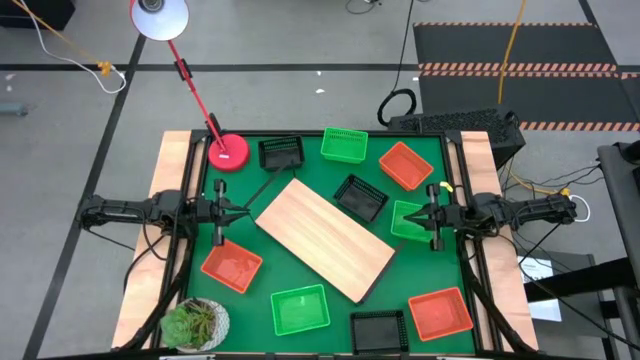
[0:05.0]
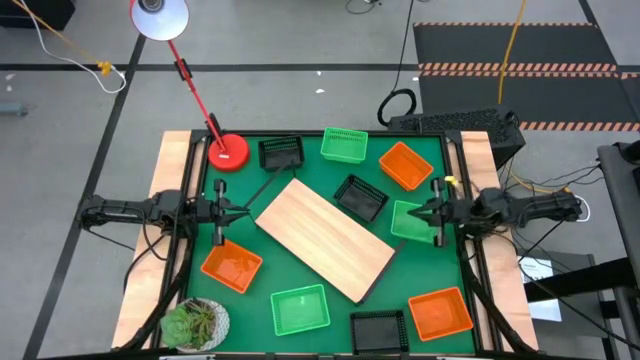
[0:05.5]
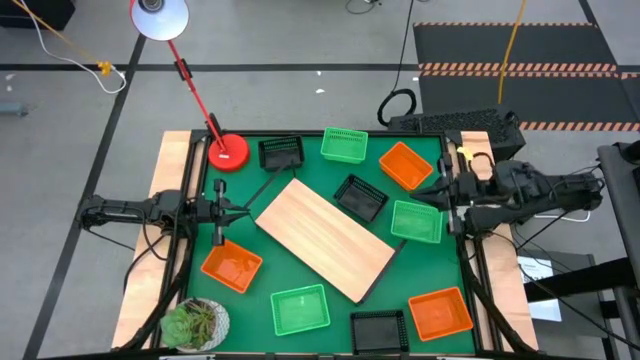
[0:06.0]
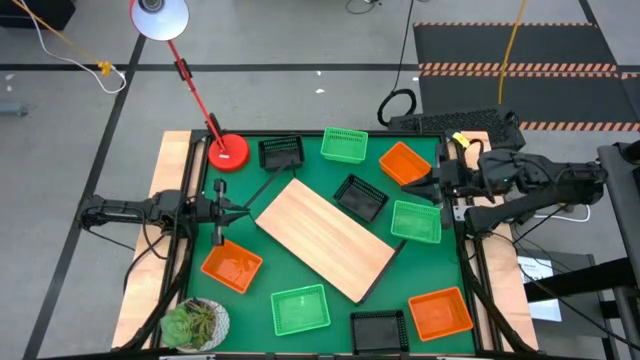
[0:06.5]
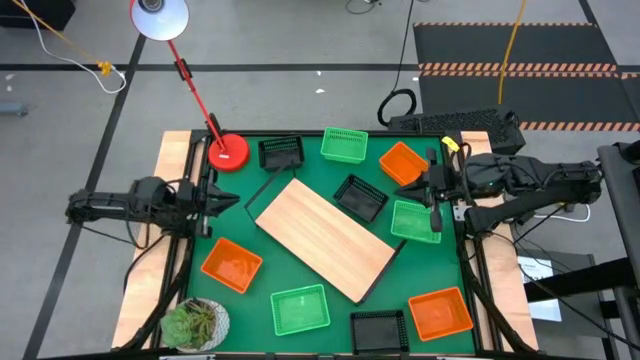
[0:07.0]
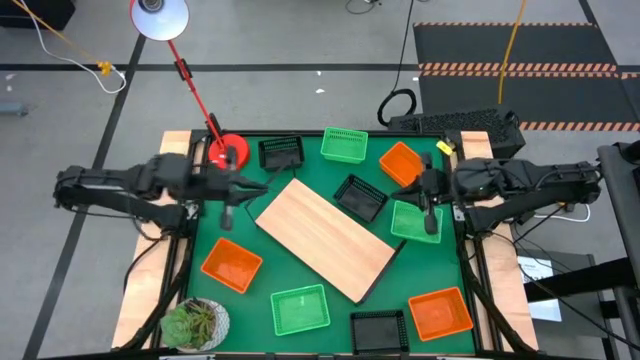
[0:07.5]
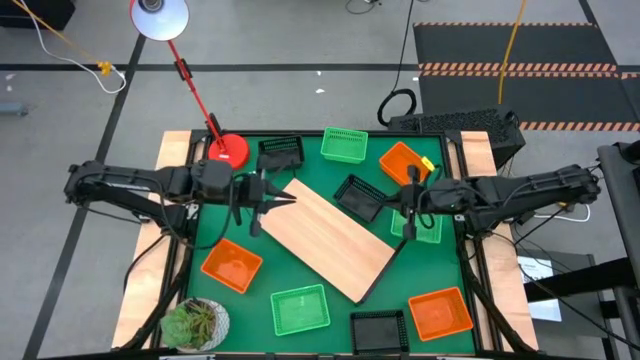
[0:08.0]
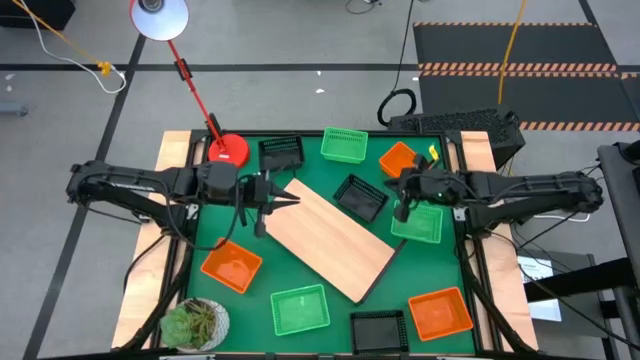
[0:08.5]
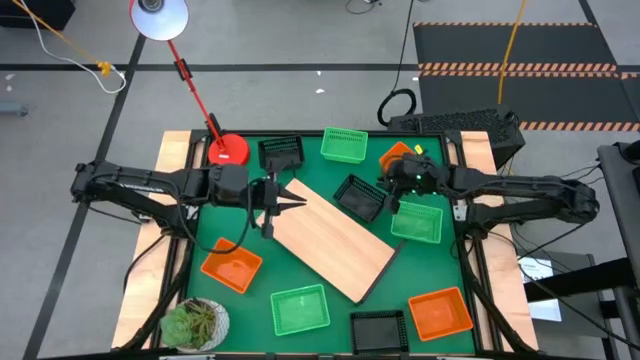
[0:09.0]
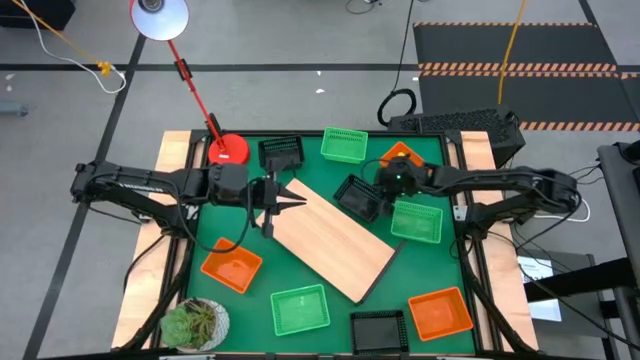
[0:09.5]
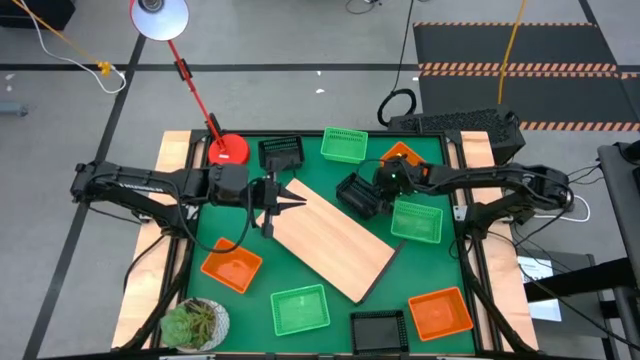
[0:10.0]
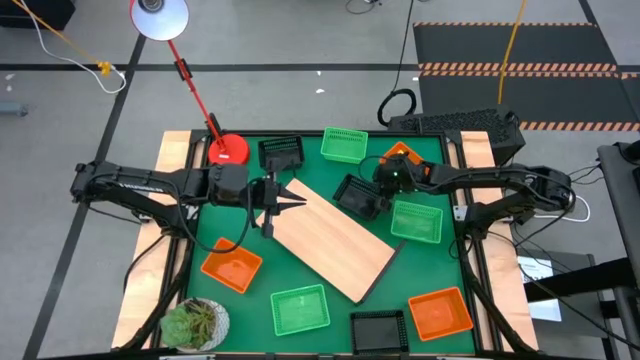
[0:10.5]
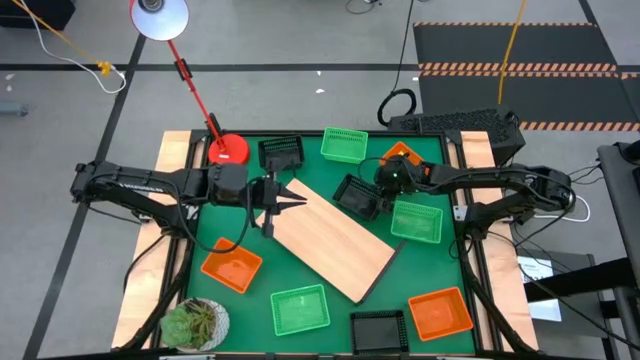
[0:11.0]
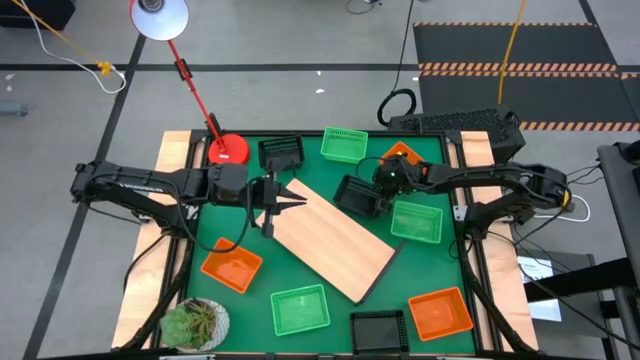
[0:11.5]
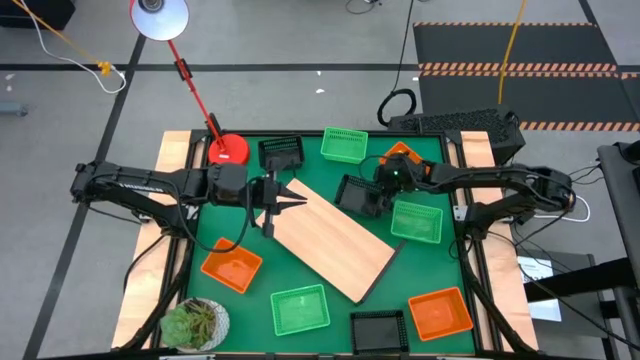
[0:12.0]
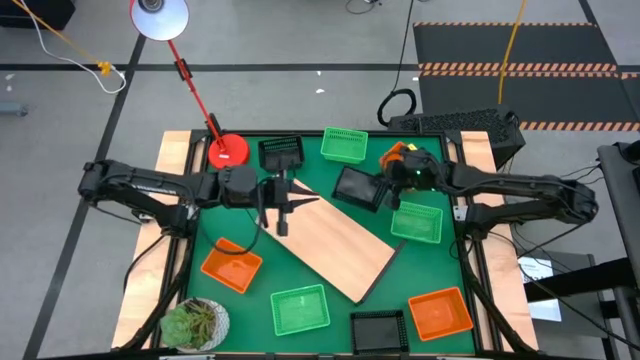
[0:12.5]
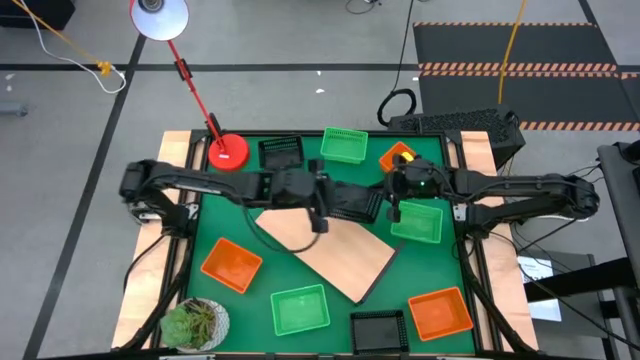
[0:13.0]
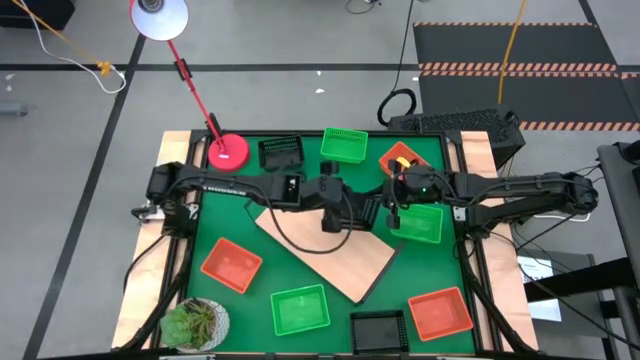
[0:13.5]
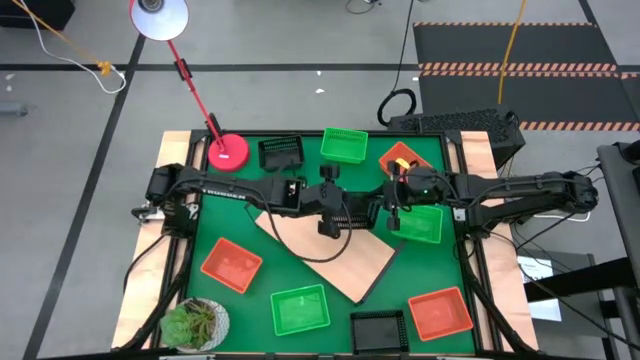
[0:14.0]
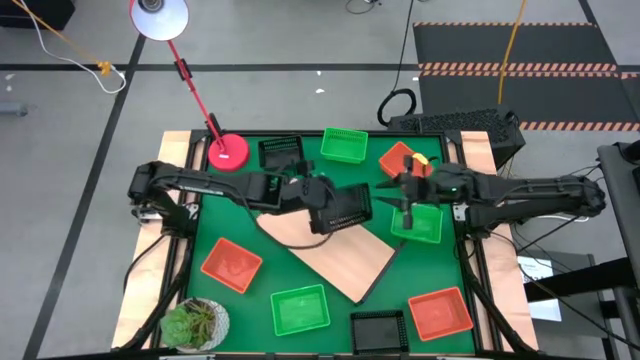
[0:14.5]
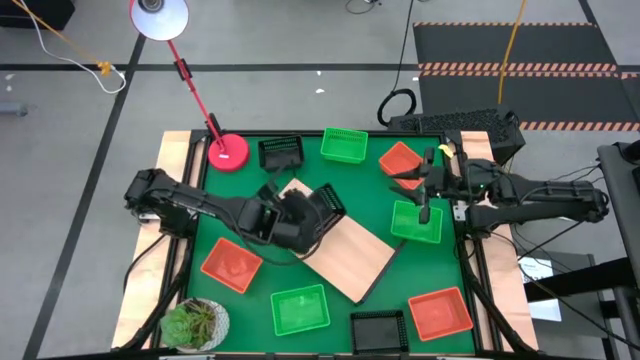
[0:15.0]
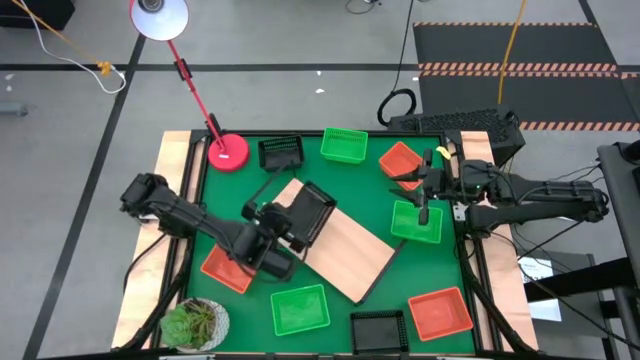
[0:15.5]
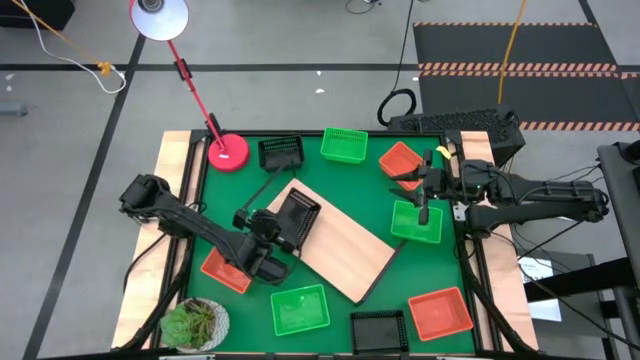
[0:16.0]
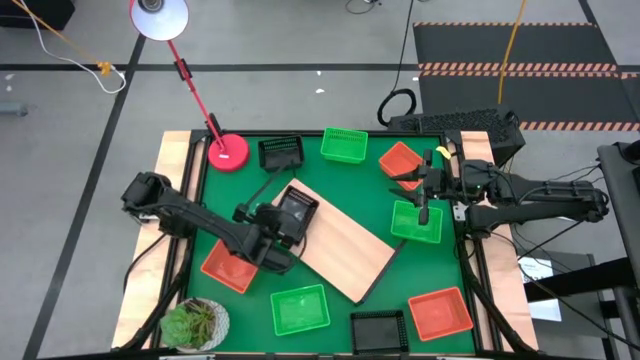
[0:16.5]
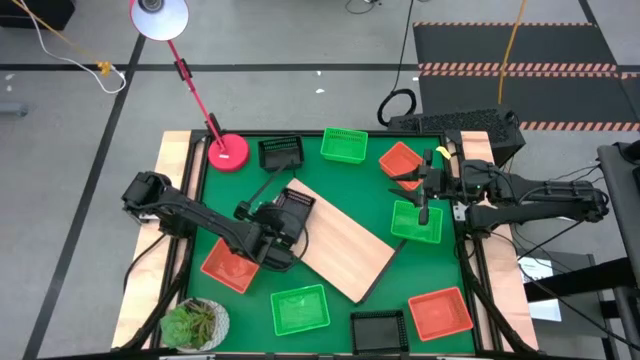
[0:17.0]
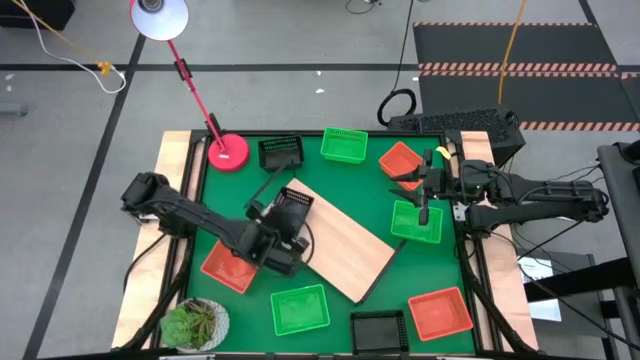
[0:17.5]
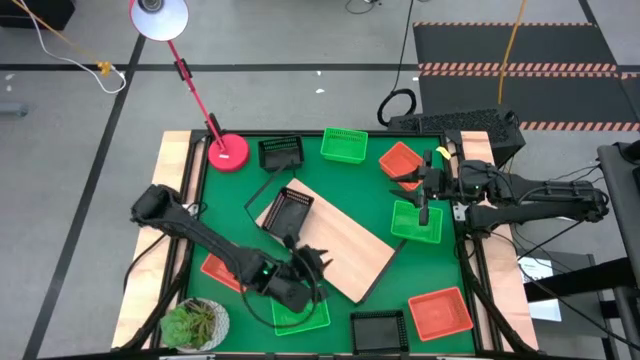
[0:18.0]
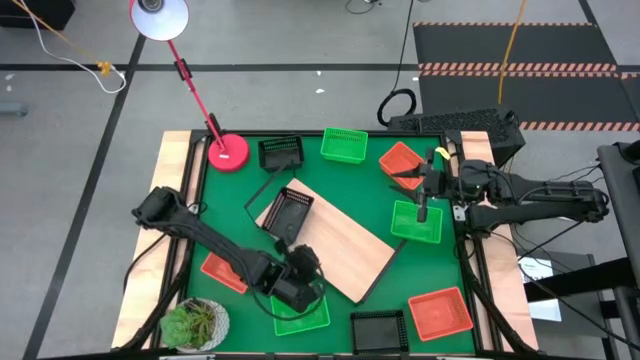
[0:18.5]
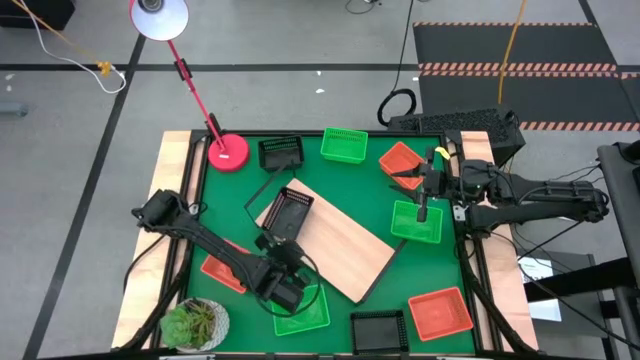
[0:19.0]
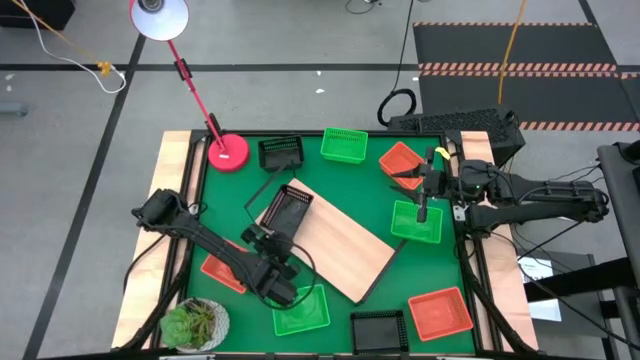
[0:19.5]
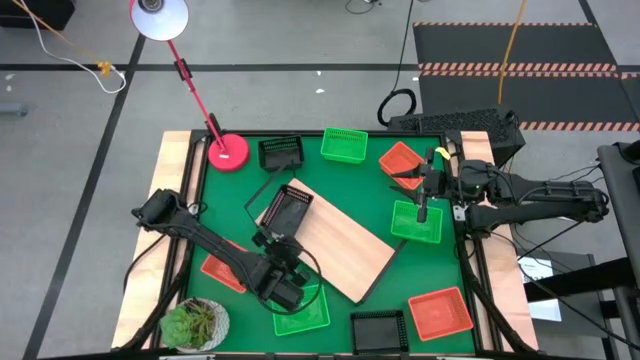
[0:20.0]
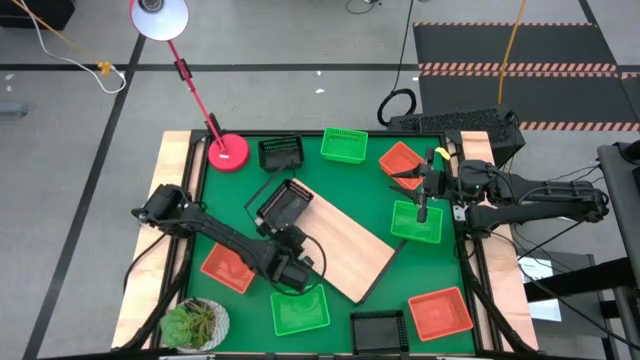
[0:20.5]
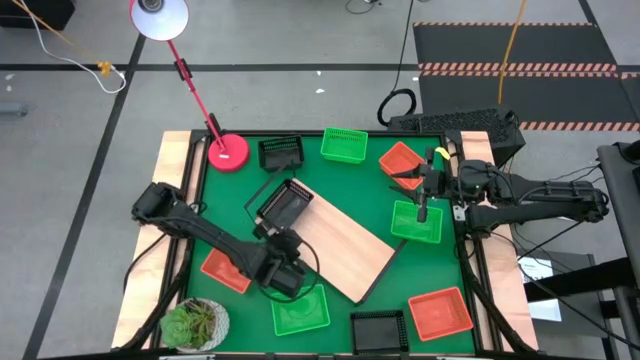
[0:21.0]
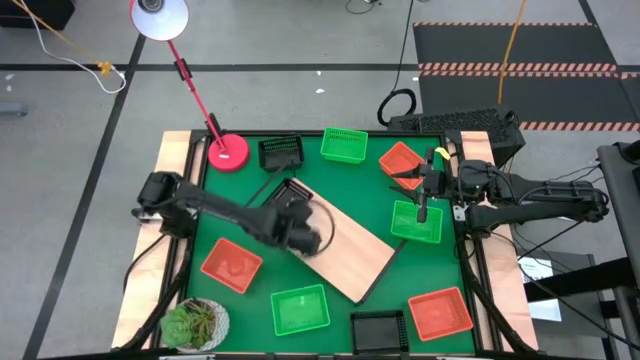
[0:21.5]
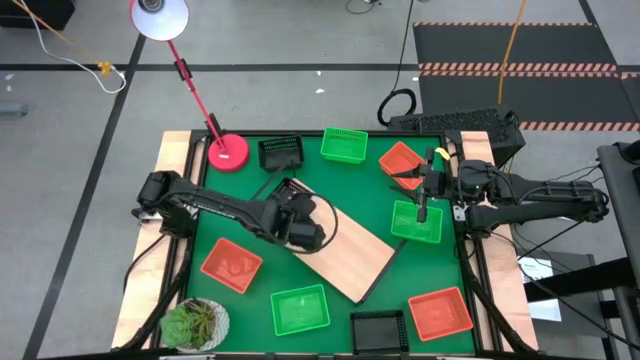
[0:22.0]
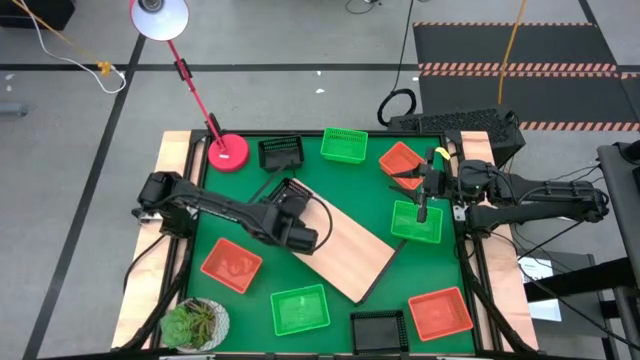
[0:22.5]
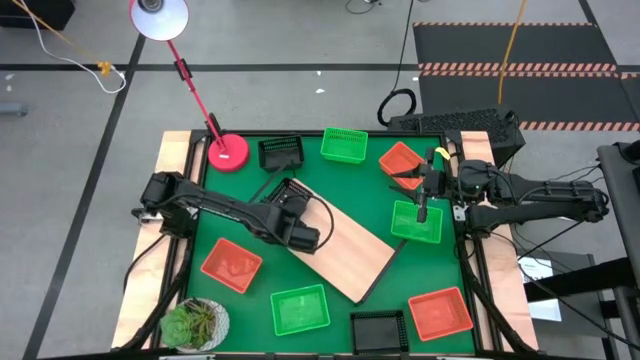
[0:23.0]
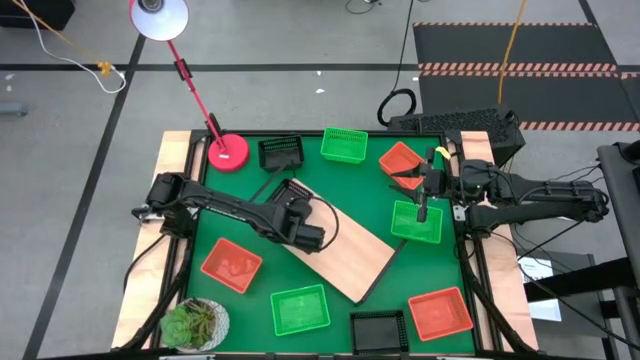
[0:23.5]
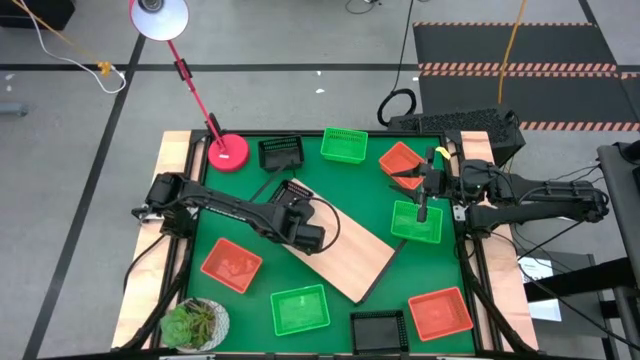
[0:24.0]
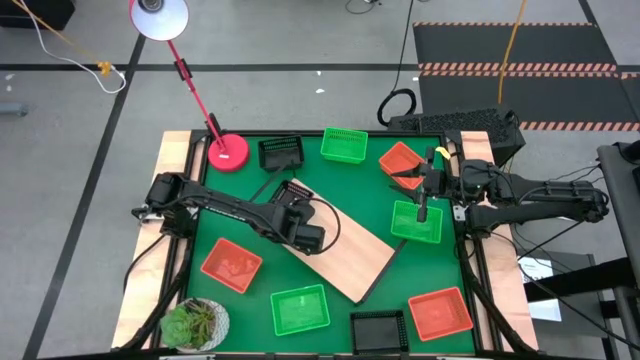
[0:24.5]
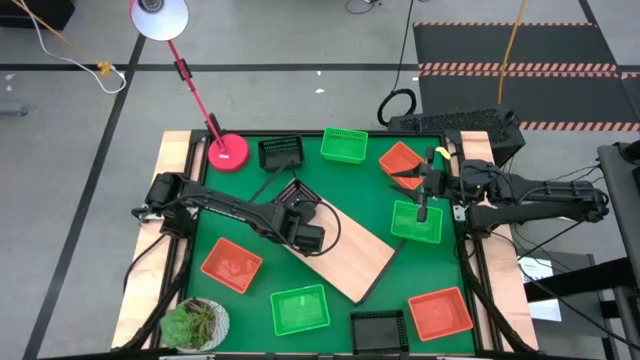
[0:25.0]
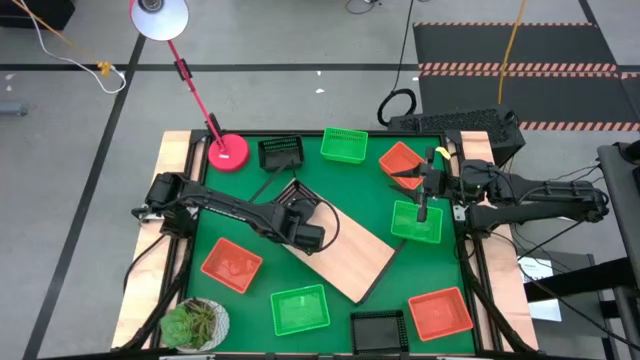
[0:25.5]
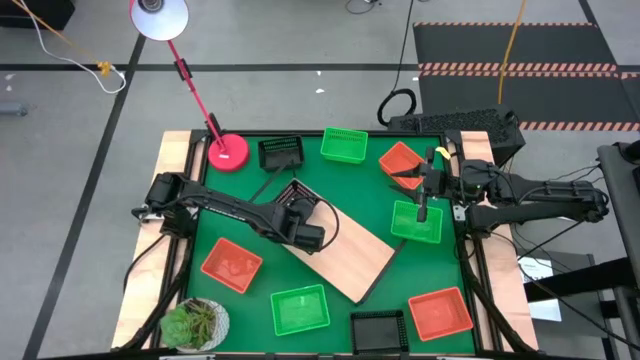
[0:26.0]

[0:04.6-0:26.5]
Task: Stack baskets on shelf by color
Put the middle black bin on the shelf
